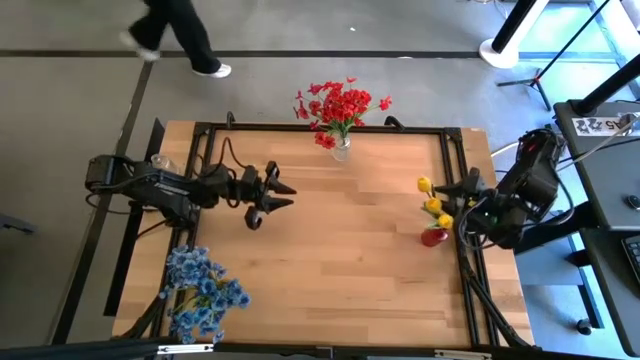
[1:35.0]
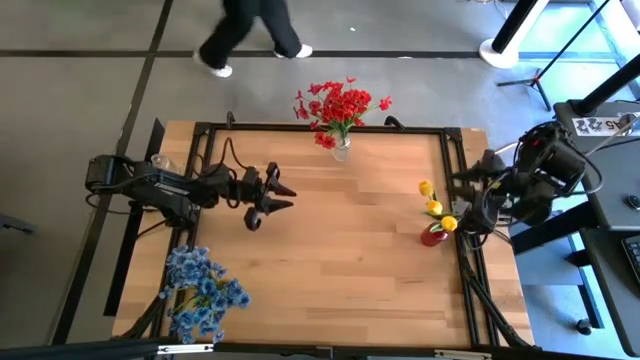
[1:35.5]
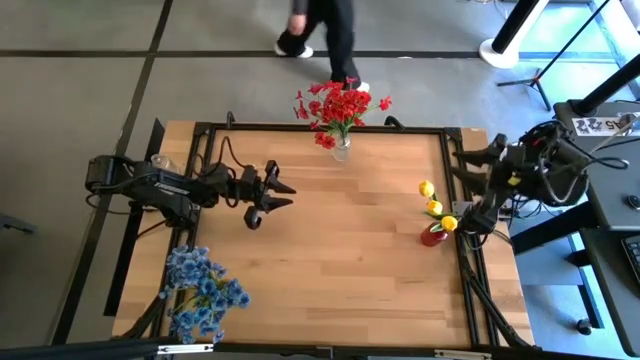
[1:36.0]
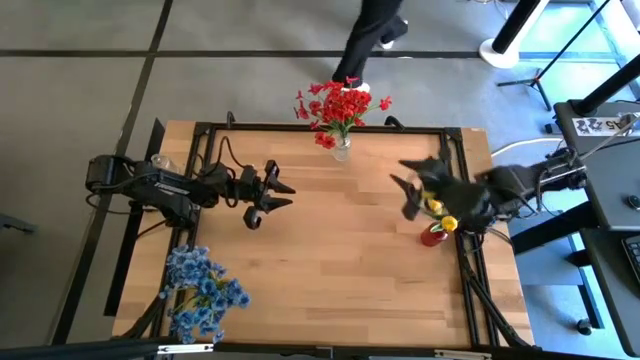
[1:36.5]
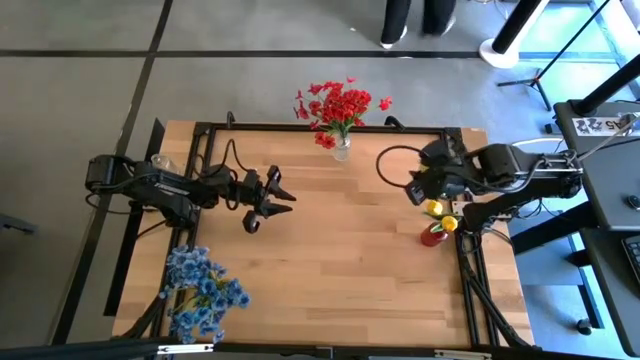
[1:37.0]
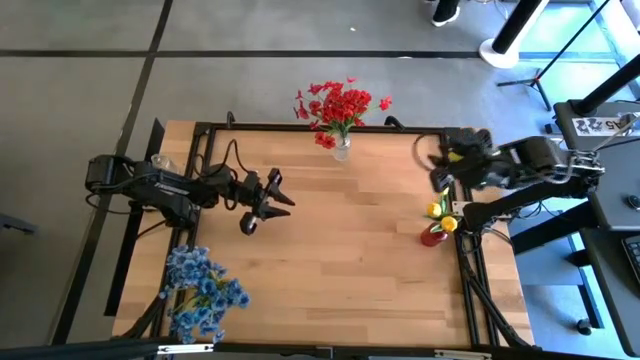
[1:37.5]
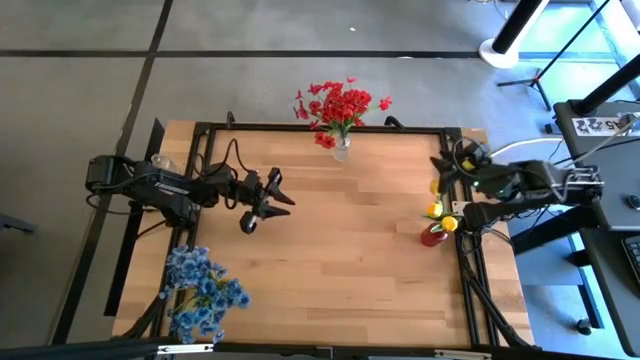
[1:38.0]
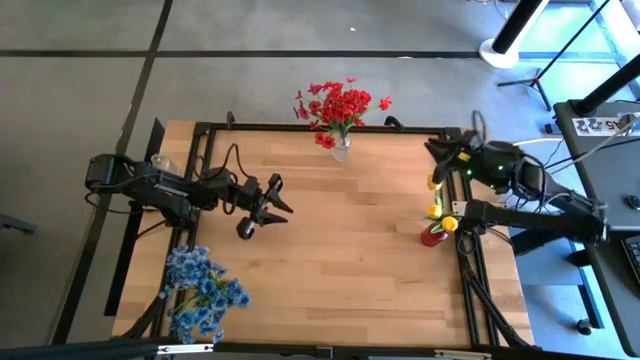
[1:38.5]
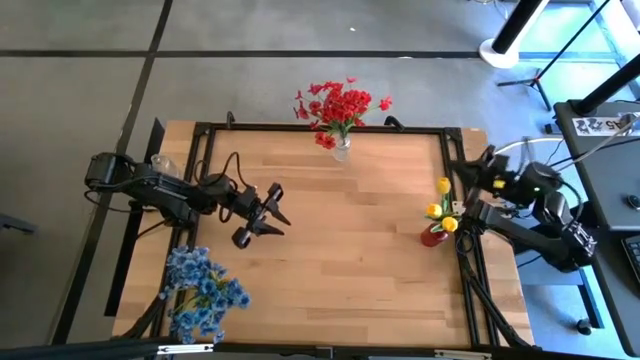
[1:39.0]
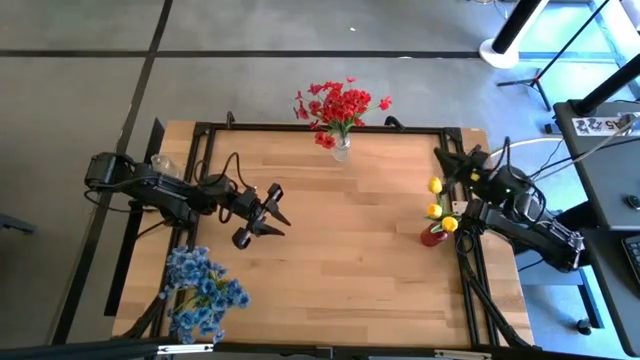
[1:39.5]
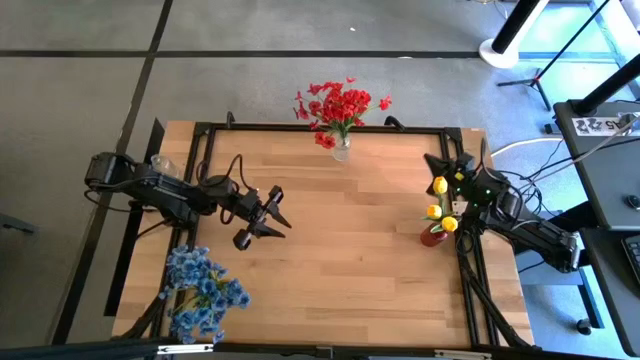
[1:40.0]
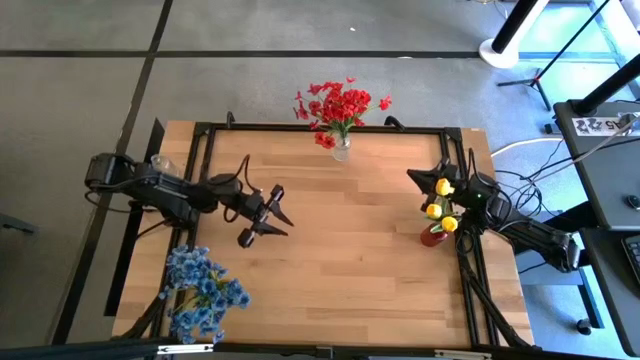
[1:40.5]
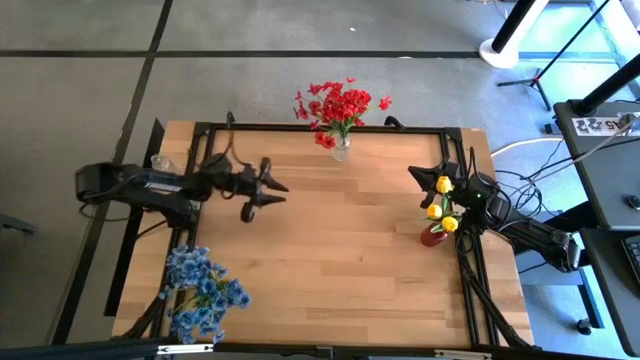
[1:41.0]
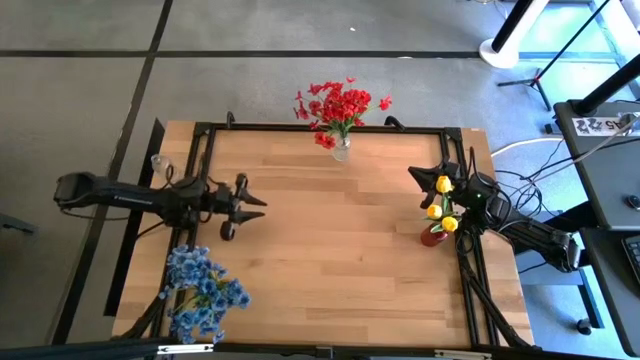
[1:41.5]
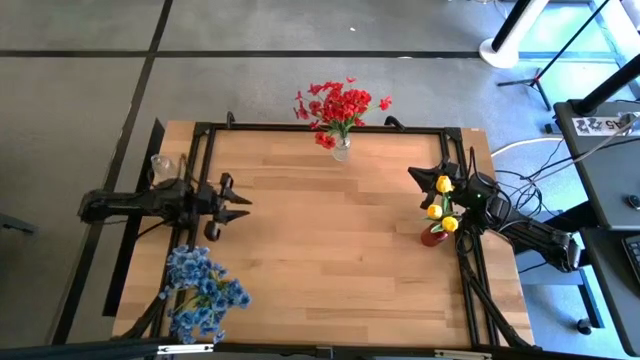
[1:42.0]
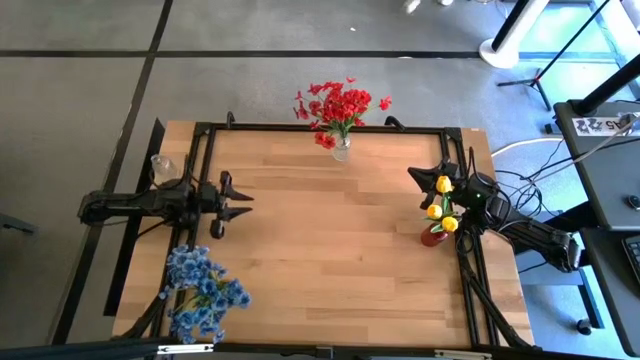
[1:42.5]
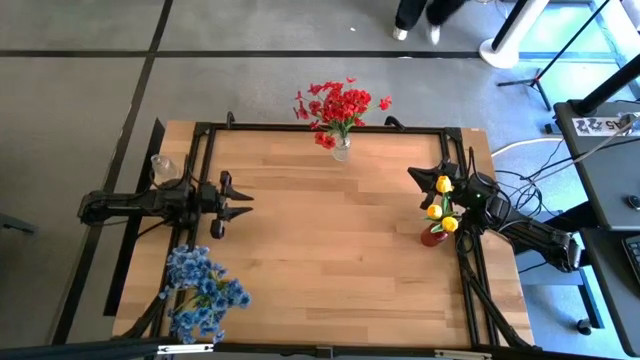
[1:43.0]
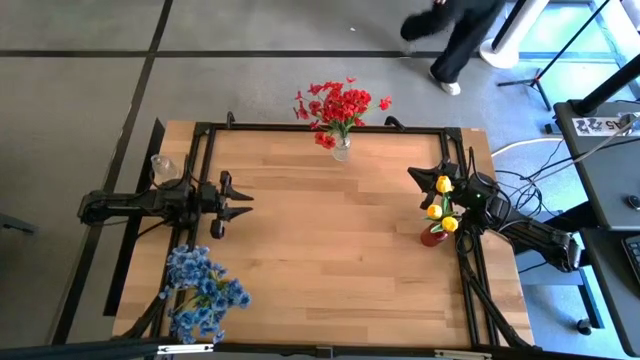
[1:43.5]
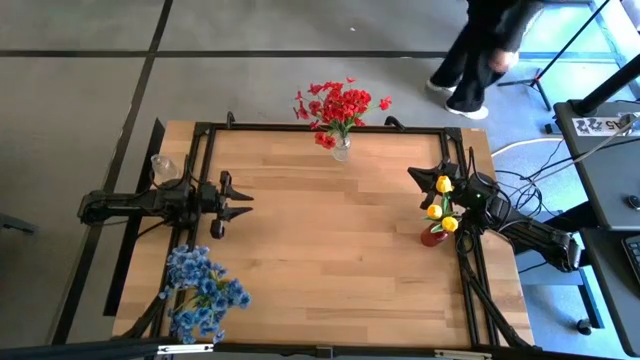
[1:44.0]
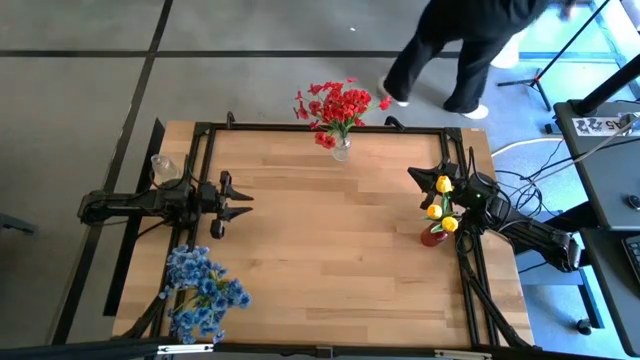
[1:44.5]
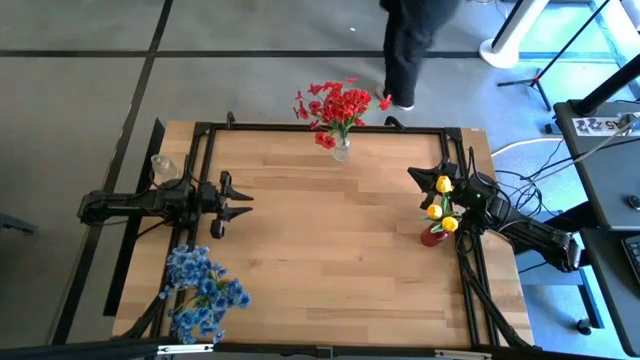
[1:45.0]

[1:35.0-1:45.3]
Task: Sort flowers into vase by color
Return to Home Position

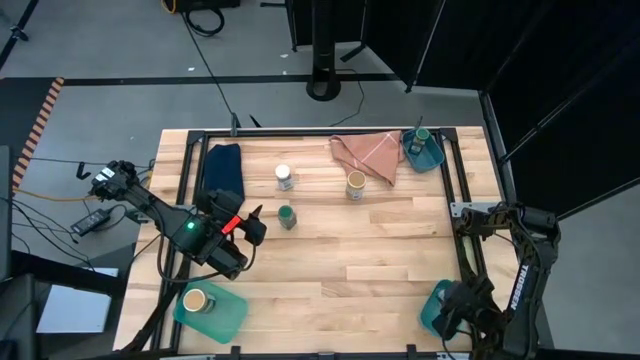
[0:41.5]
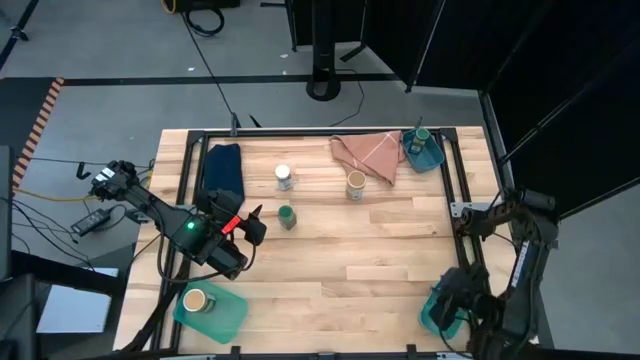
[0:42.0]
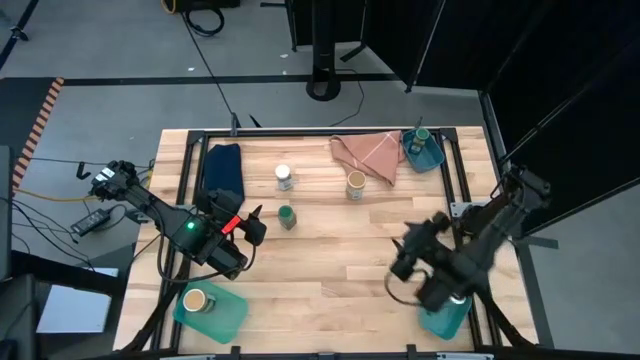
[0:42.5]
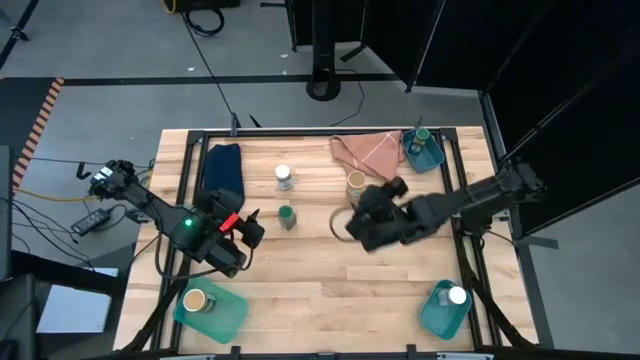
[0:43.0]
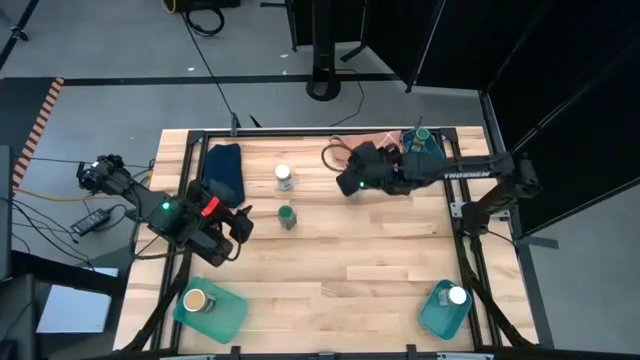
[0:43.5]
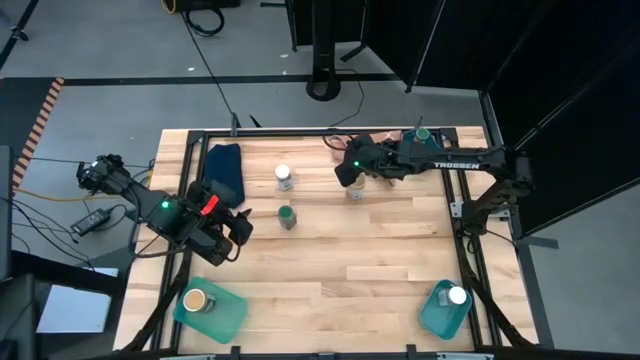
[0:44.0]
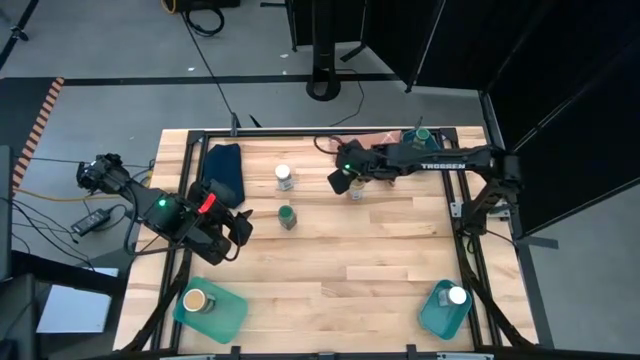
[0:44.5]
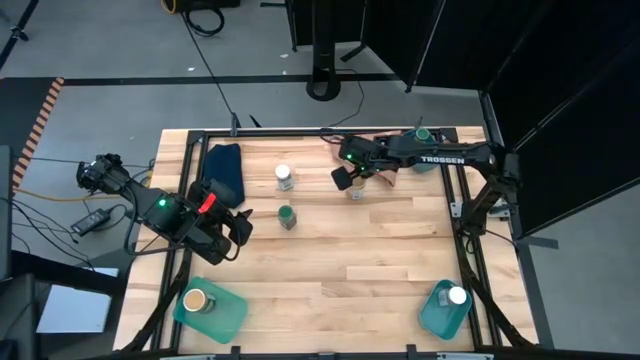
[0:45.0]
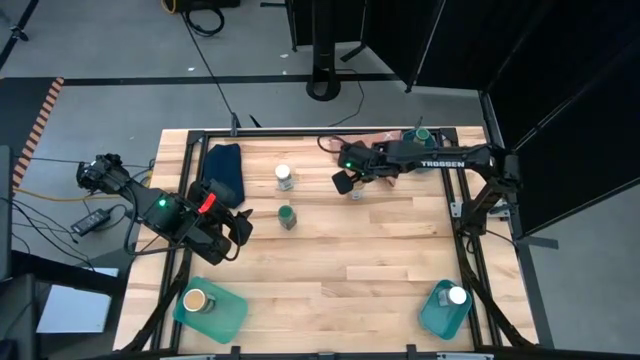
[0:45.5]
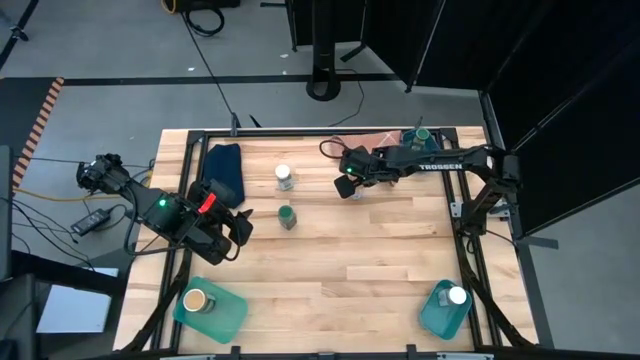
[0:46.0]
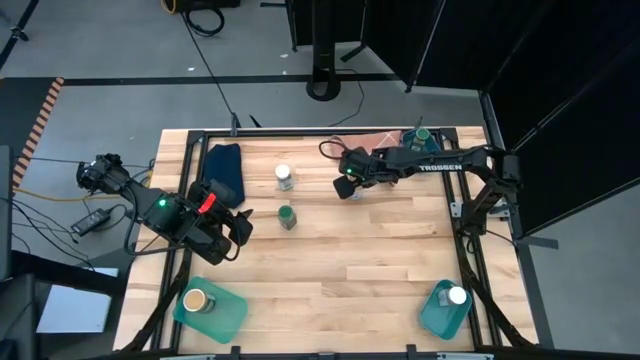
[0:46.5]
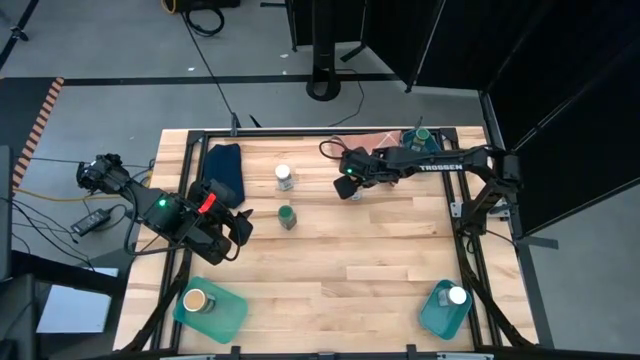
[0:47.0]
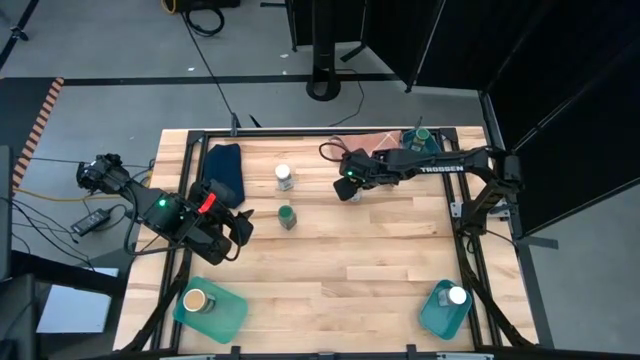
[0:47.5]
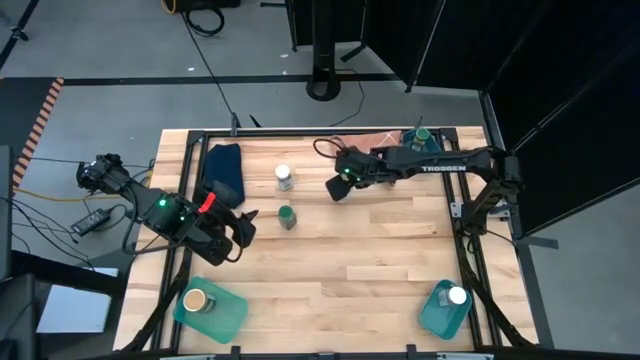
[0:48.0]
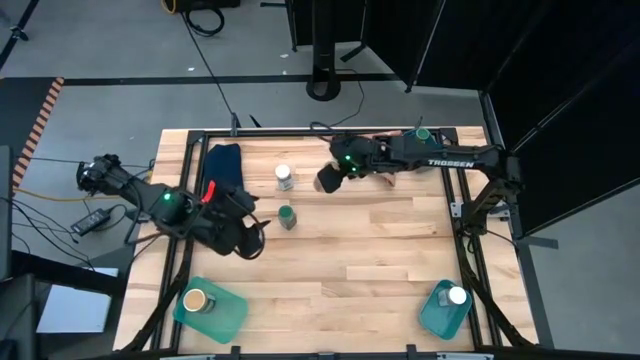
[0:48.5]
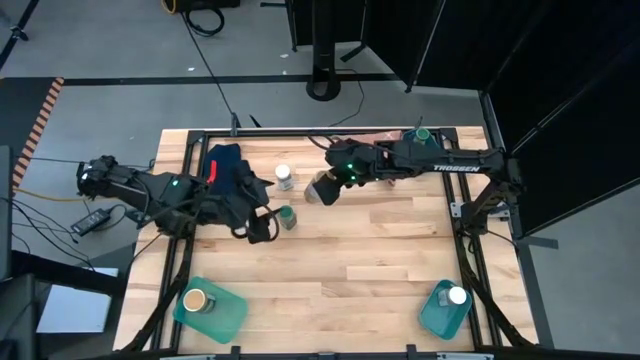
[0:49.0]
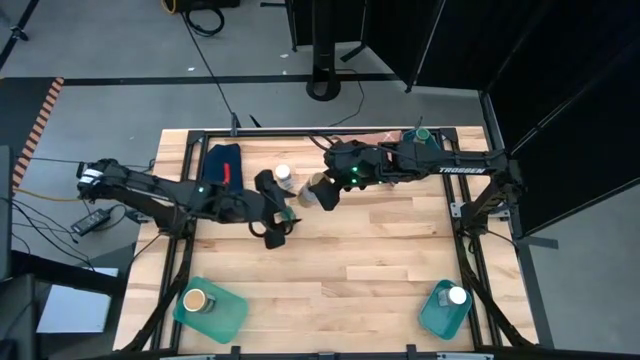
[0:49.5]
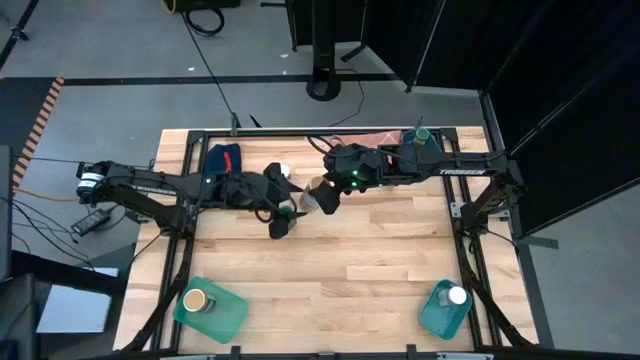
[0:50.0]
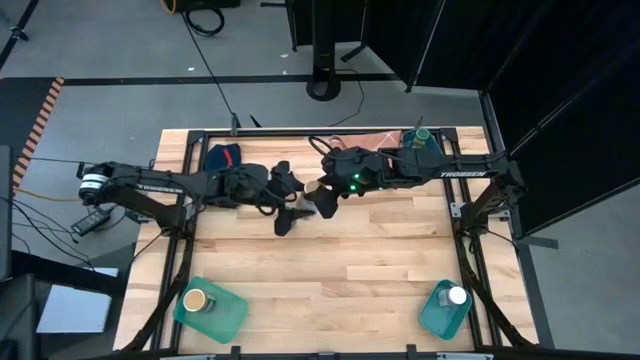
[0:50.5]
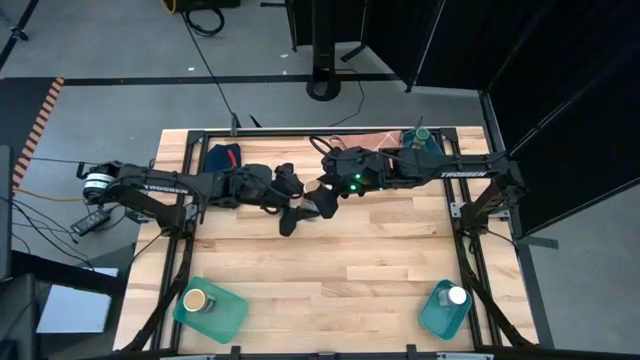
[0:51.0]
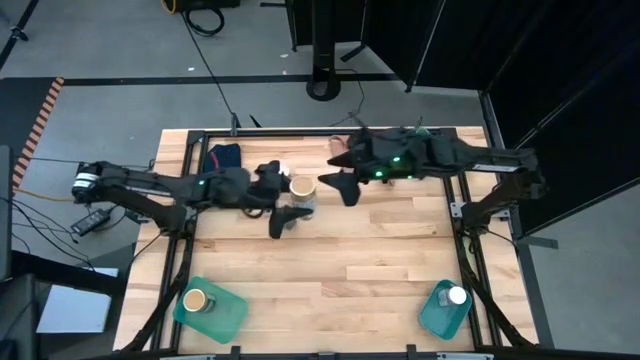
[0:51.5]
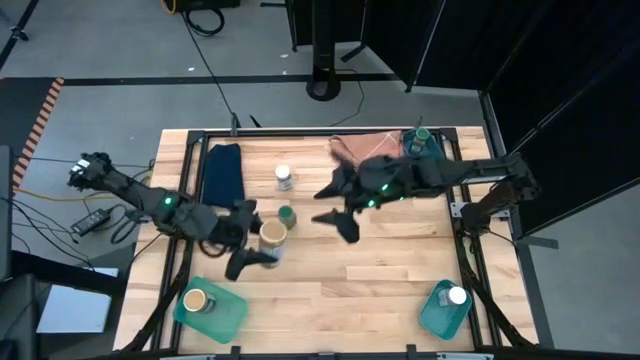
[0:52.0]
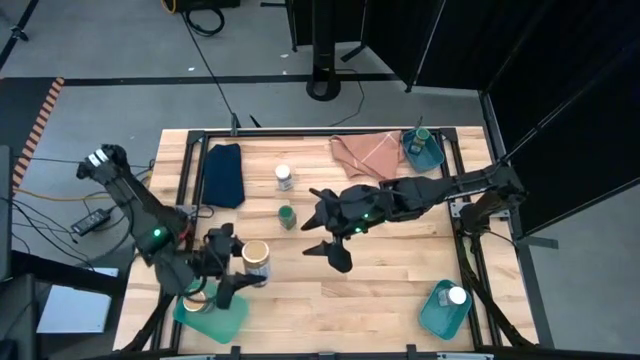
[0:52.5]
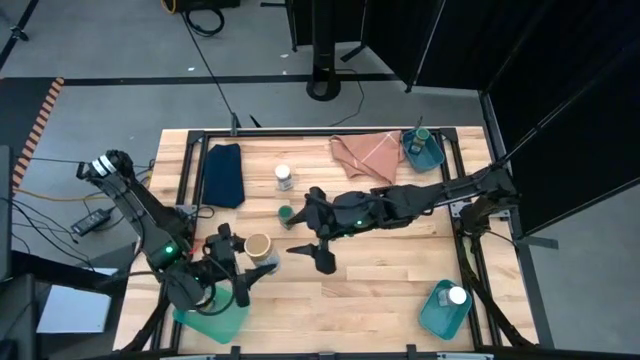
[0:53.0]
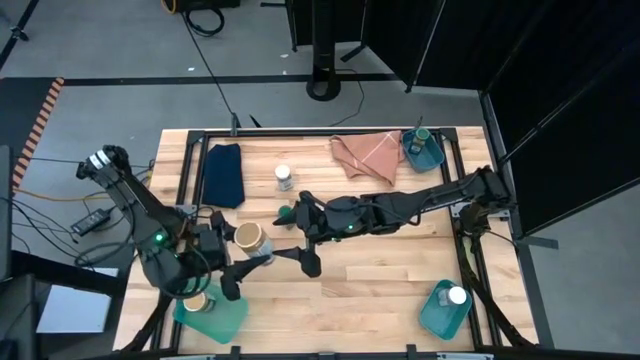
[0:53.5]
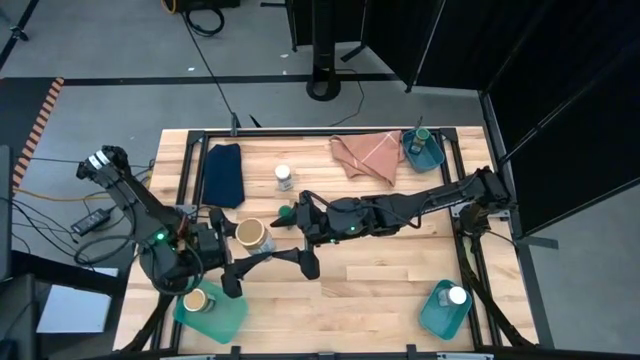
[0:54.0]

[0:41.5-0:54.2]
Task: Sort spices by type
Put the brown seasoning bottle into the green transparent bin
